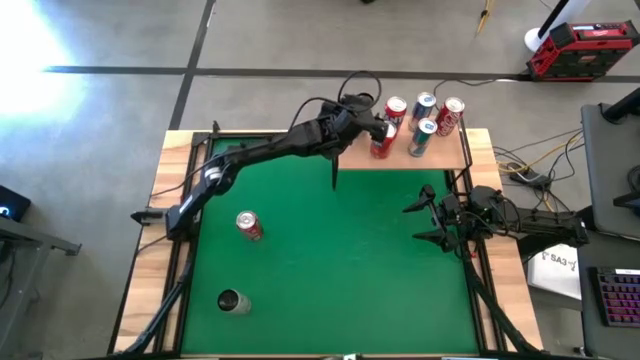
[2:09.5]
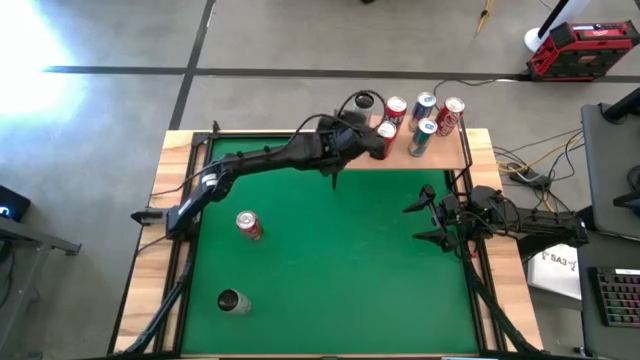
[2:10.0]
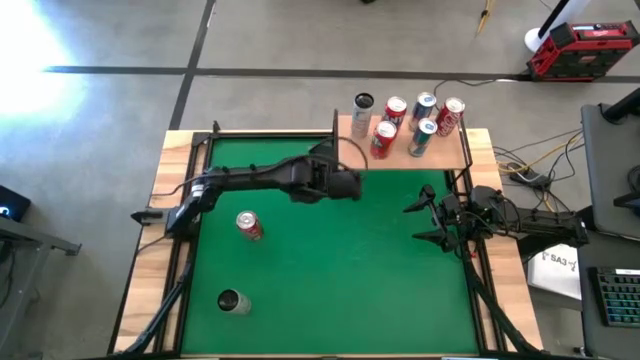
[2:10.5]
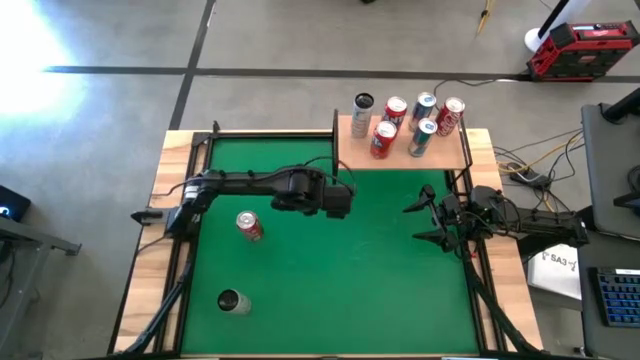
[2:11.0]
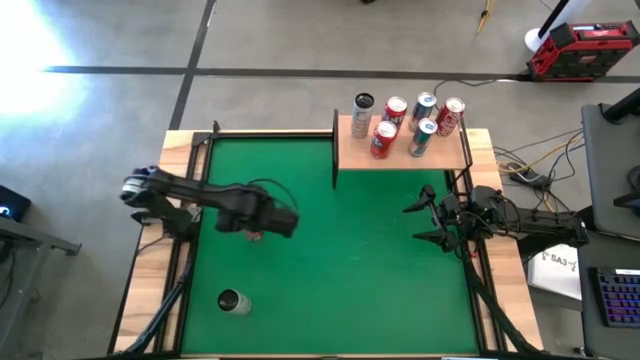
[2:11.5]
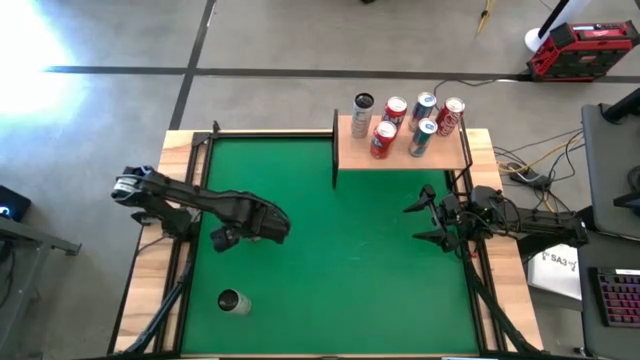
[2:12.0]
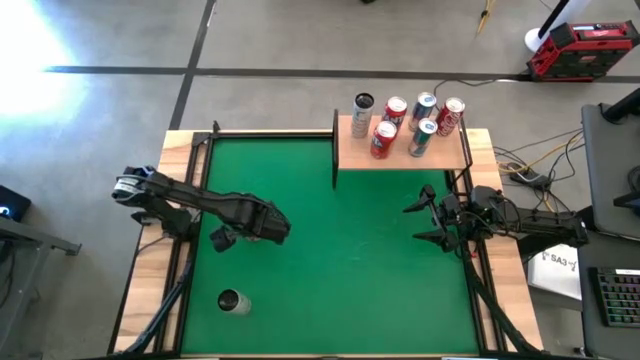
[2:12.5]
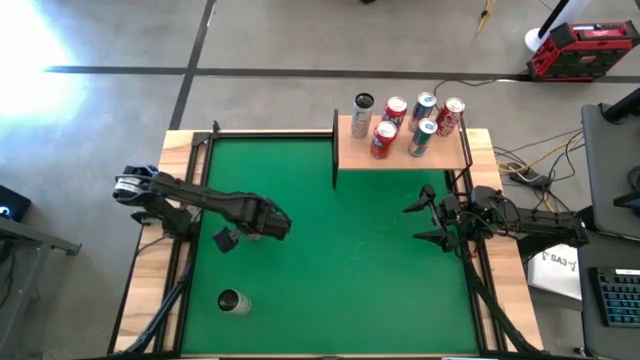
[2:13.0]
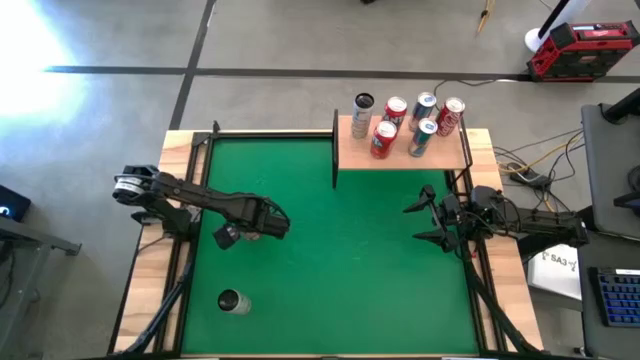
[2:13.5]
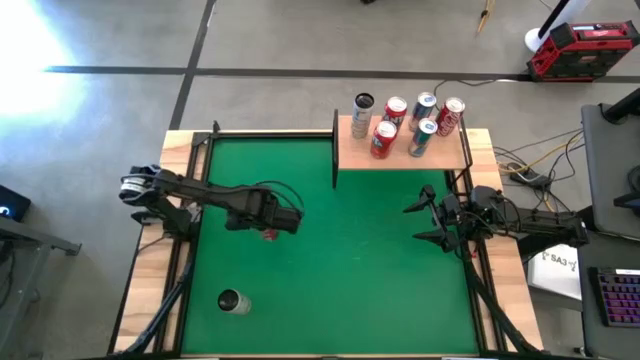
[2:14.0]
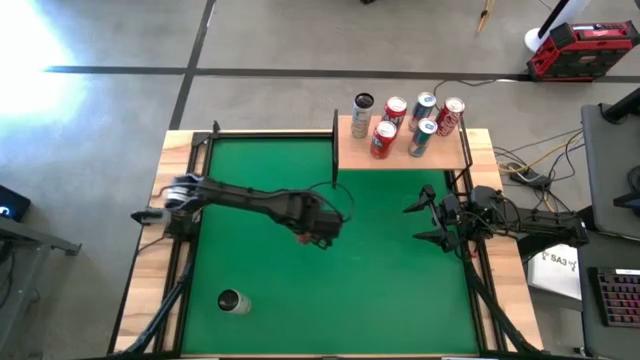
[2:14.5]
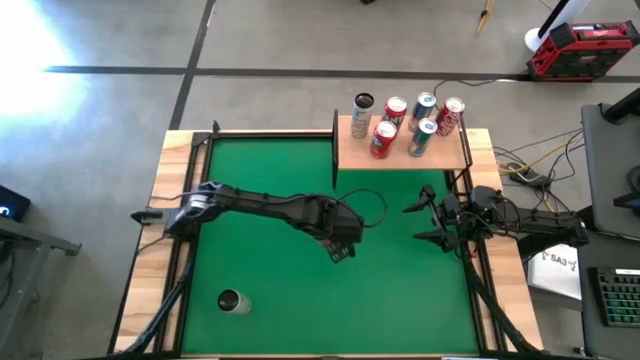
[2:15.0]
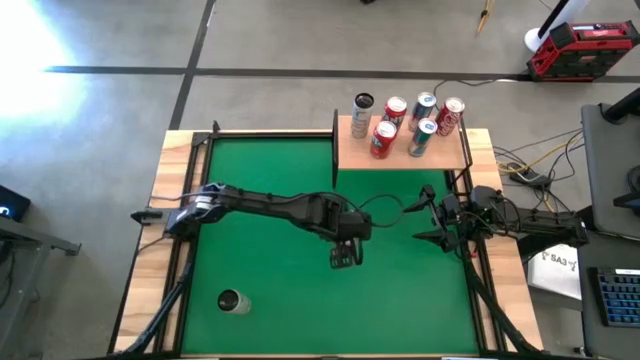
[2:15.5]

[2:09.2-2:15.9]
Task: Place canned beverage on shelf
Move the red soda can to the center of the table

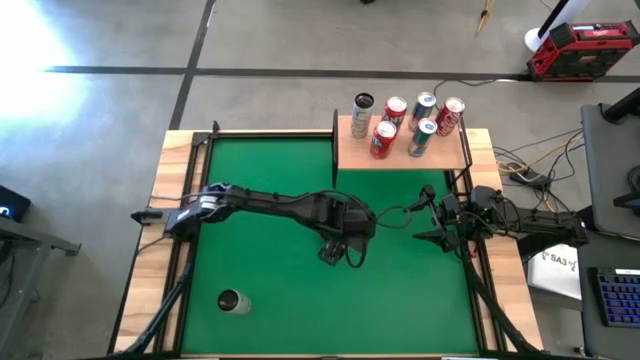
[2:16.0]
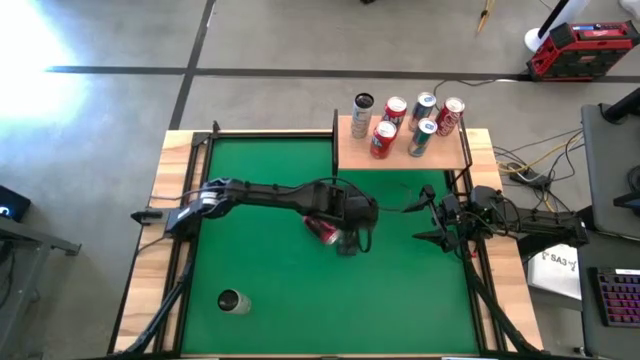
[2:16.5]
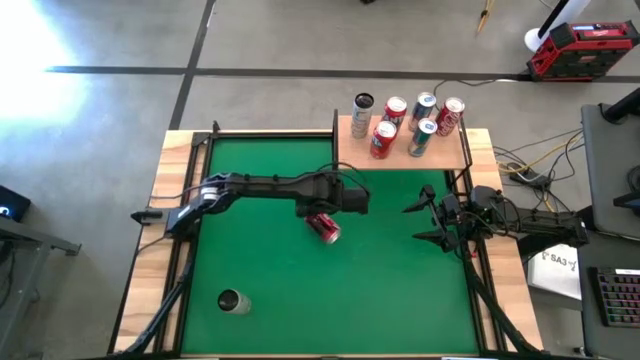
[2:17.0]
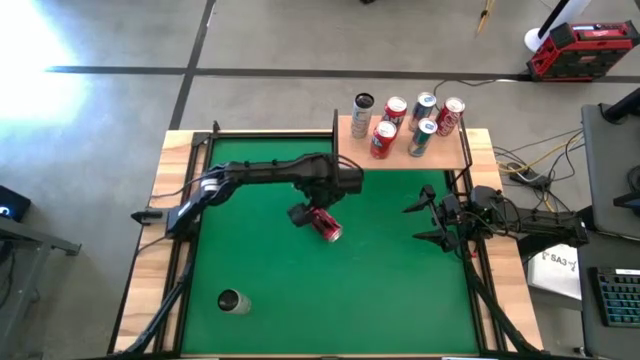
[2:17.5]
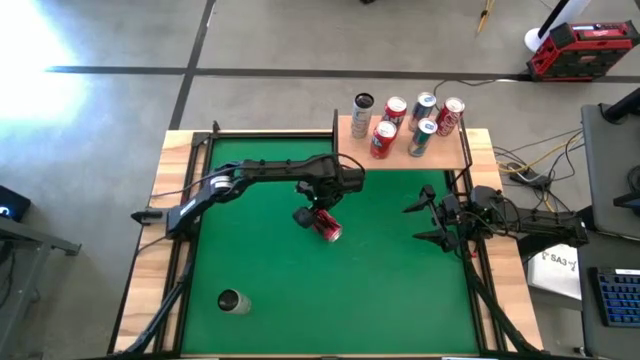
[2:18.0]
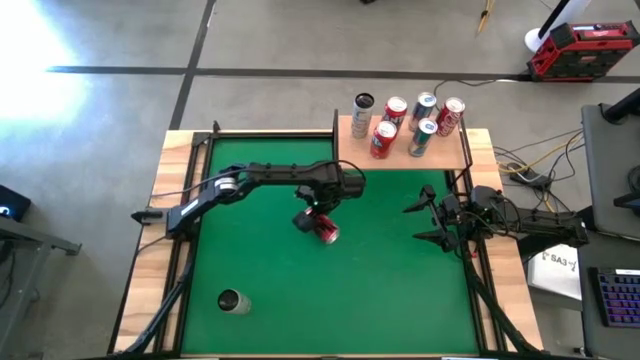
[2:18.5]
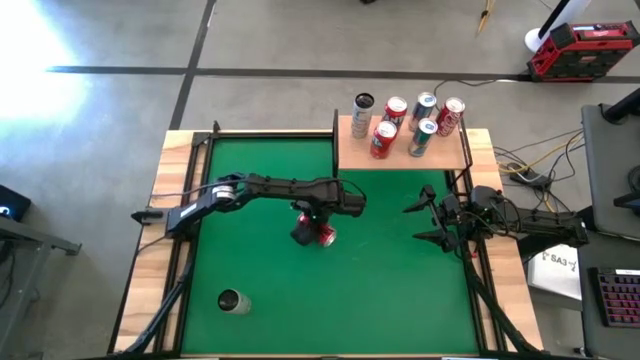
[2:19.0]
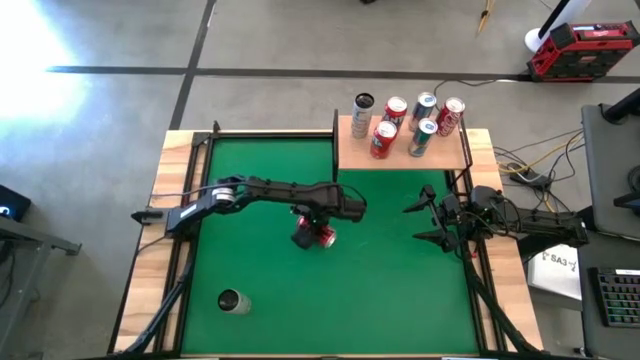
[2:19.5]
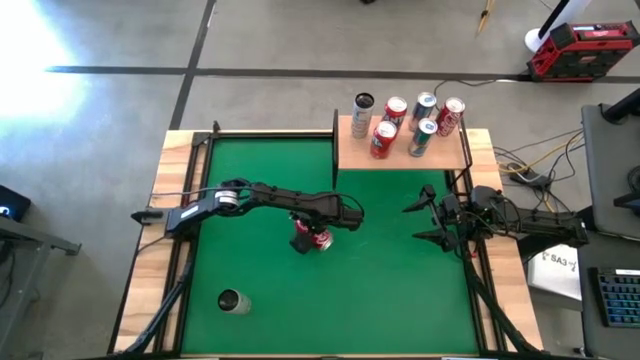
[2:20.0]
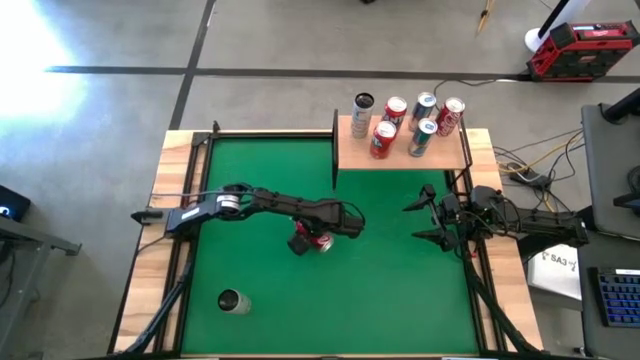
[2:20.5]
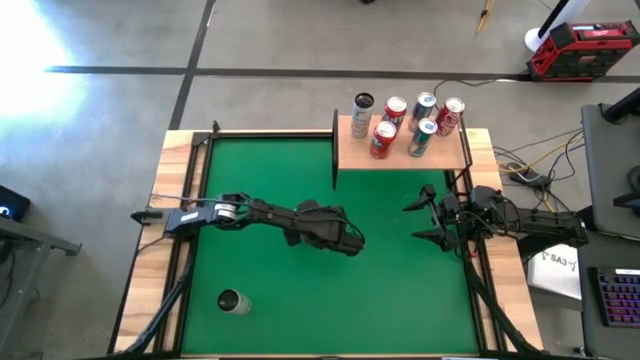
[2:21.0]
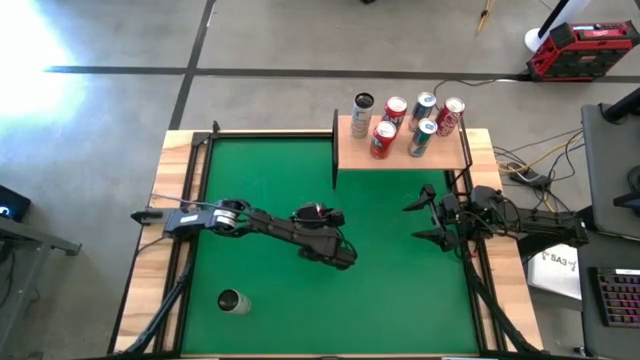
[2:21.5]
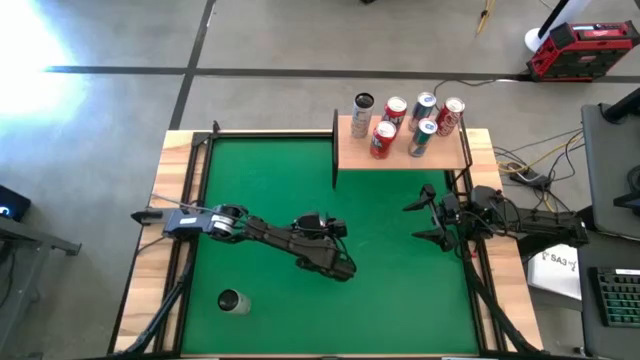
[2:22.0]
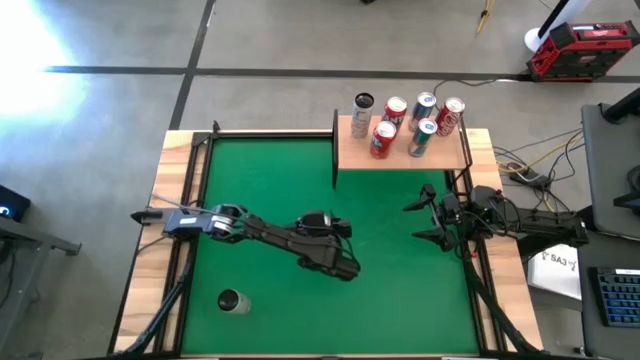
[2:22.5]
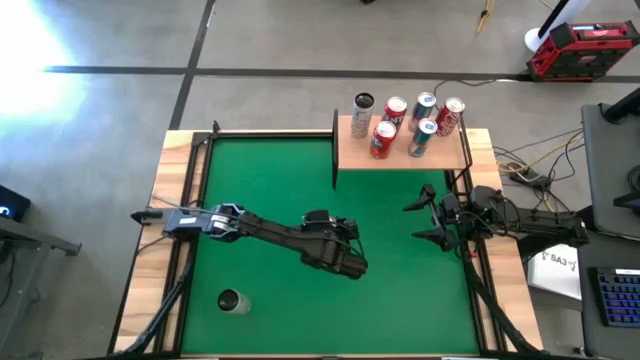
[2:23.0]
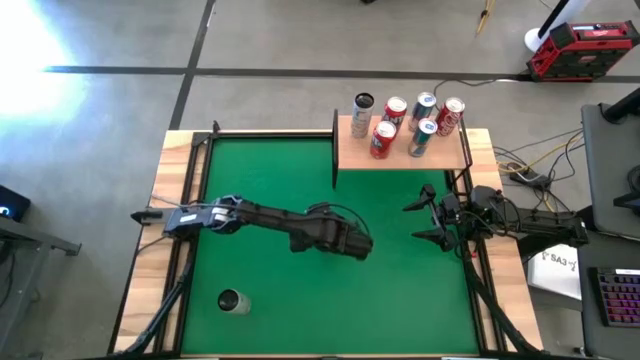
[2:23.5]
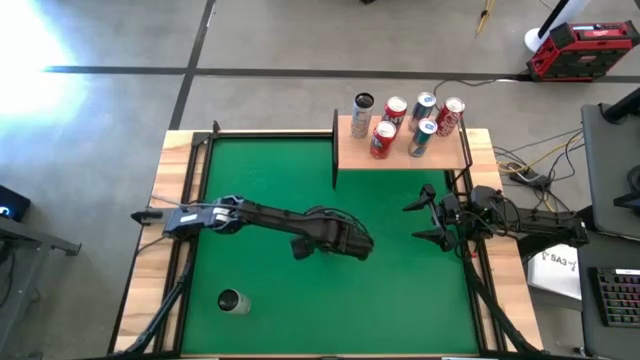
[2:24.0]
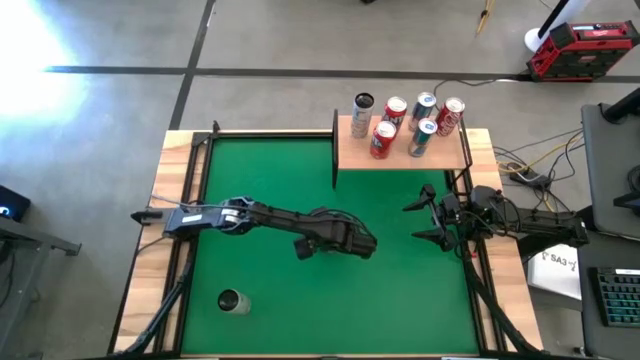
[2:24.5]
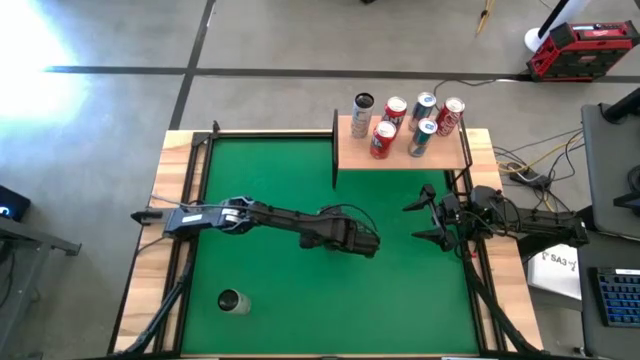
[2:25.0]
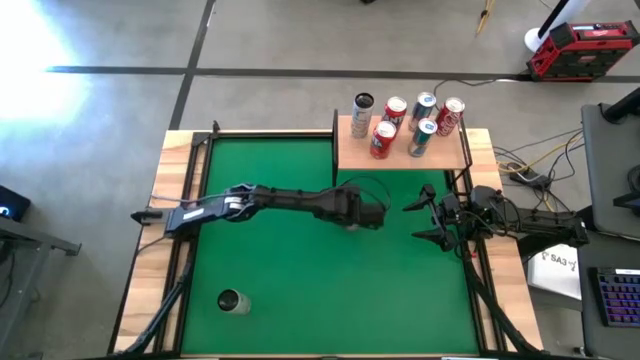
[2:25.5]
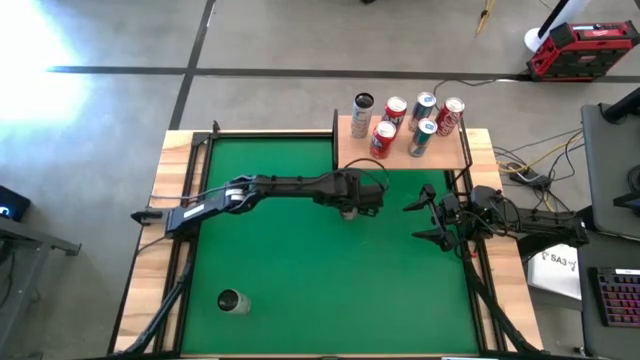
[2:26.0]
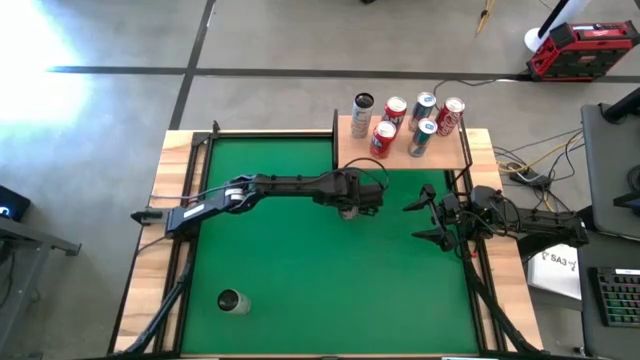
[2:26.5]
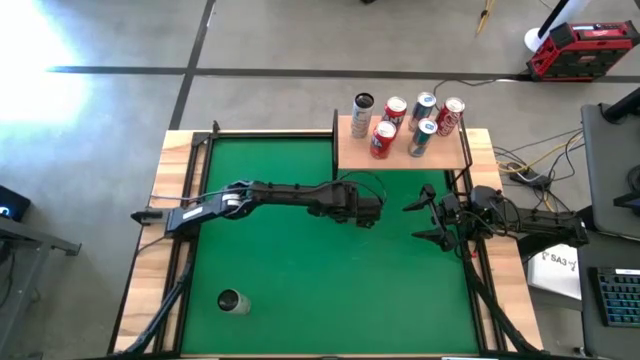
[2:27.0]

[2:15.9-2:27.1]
Move the red-white soda can to the center of the table
